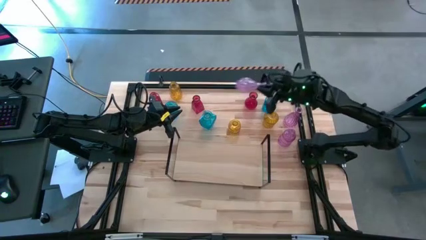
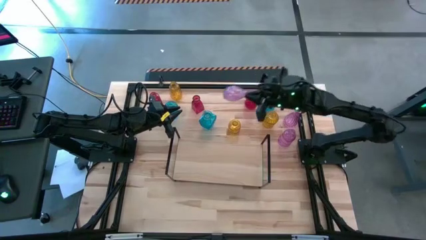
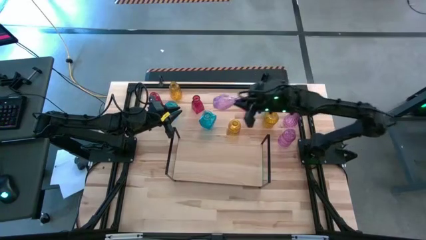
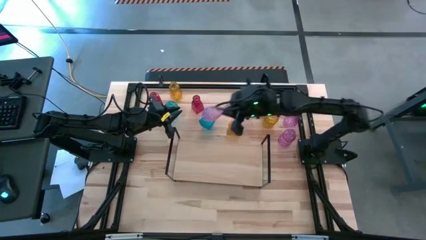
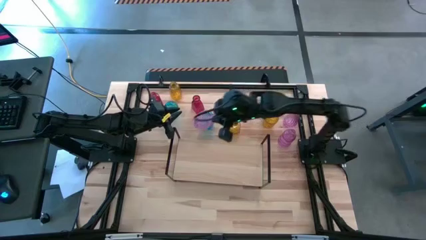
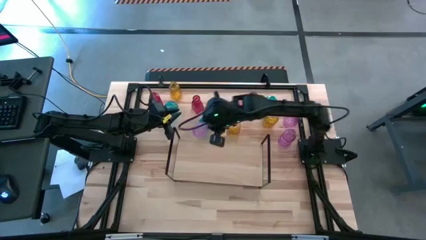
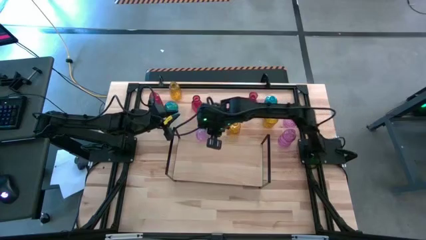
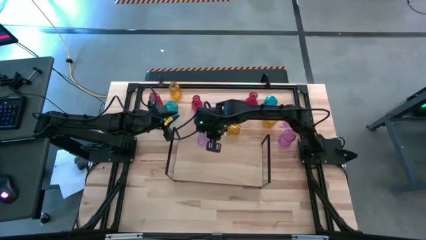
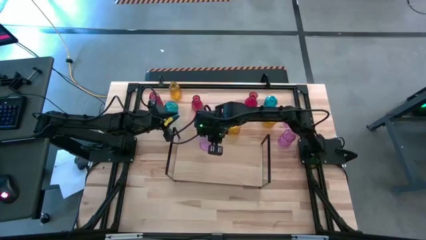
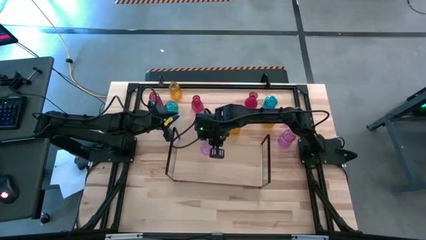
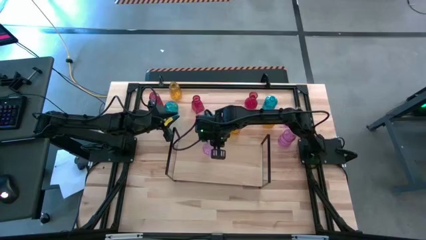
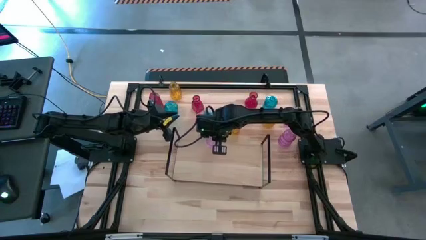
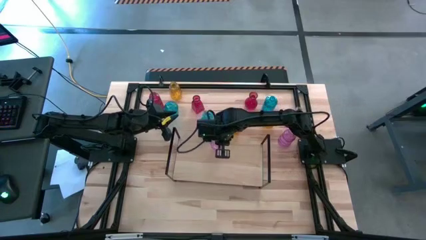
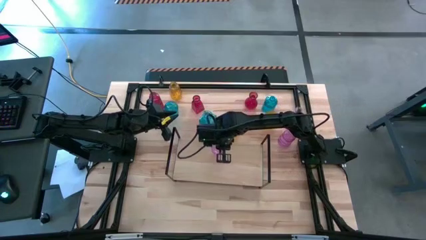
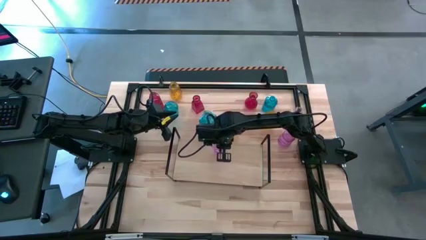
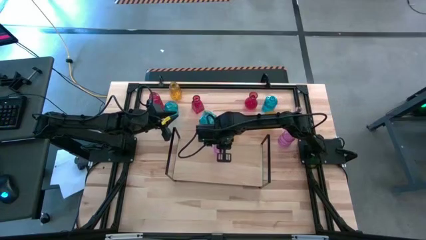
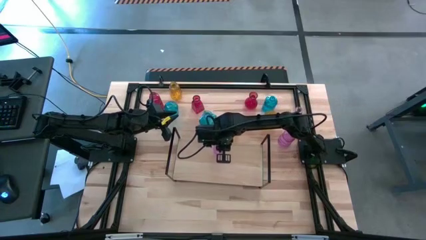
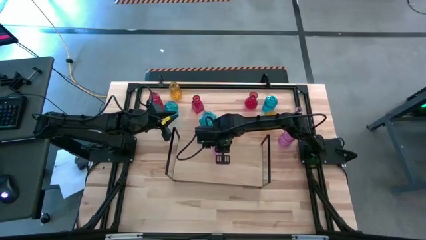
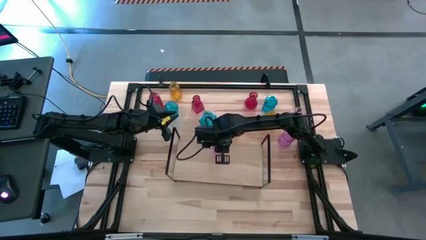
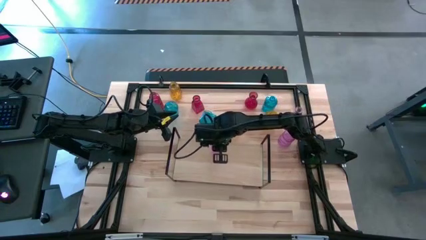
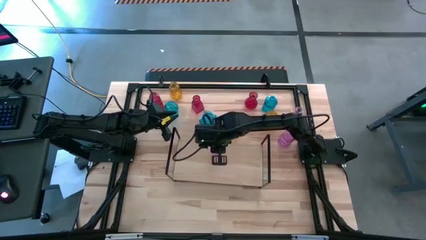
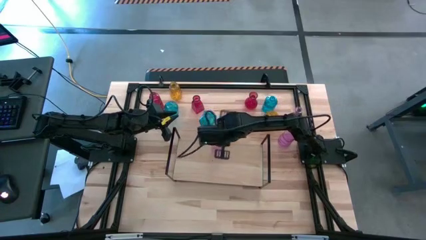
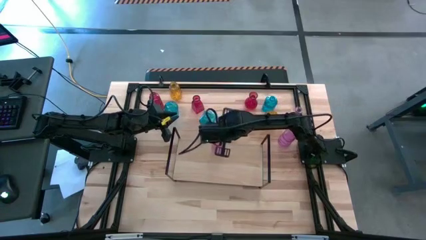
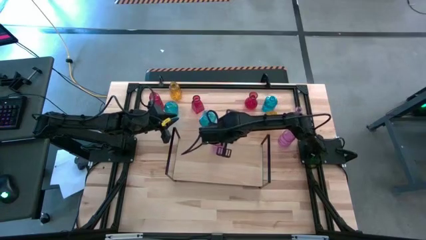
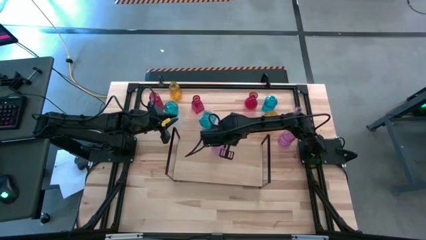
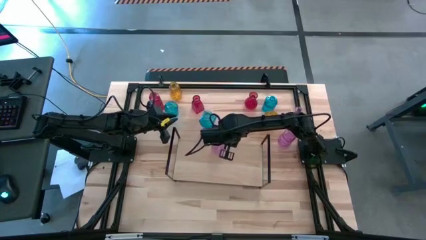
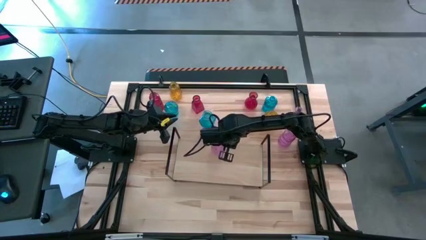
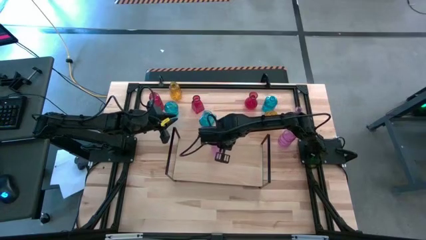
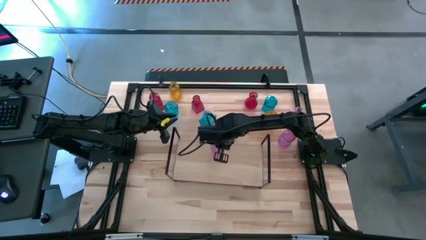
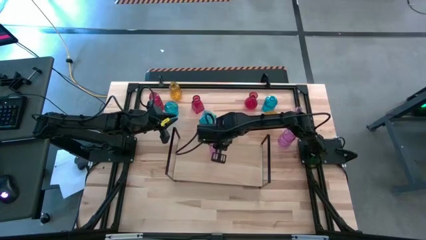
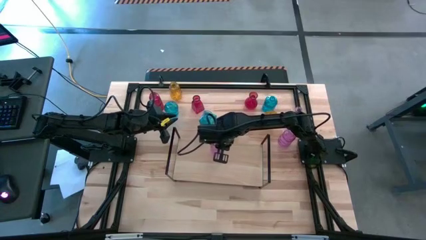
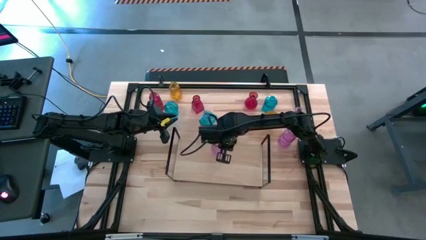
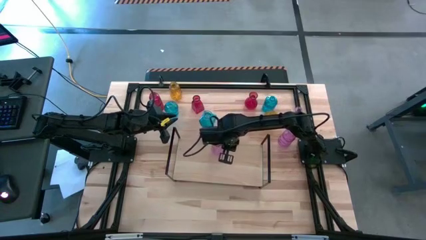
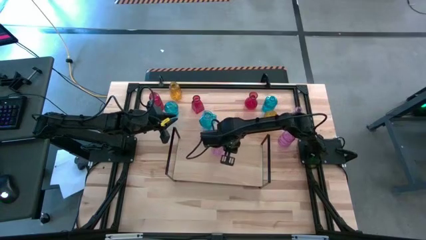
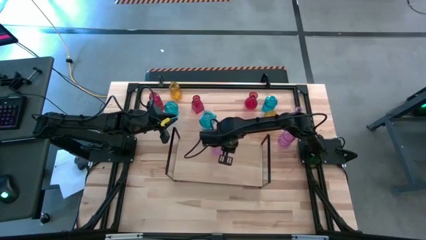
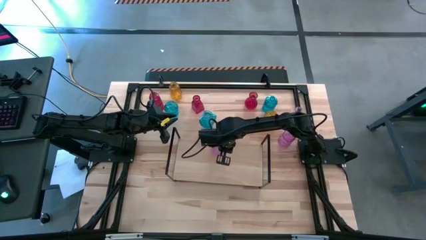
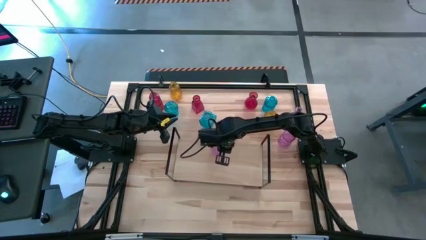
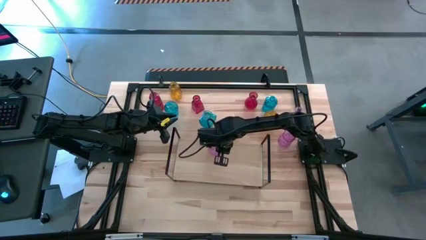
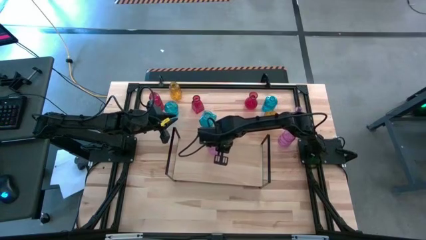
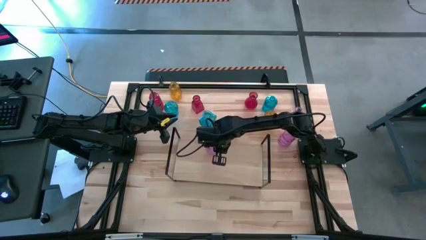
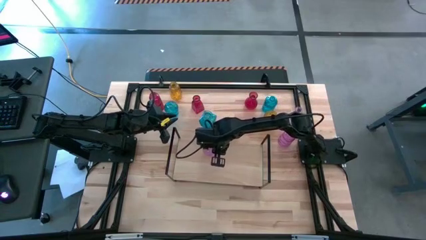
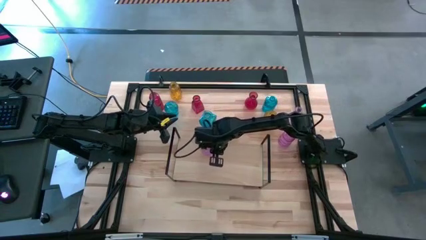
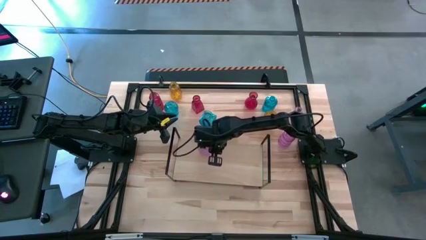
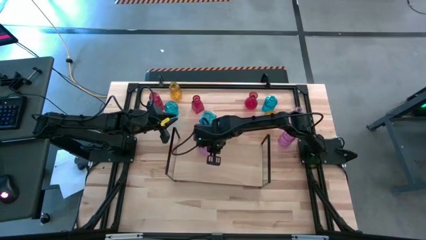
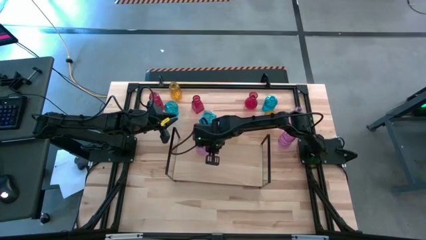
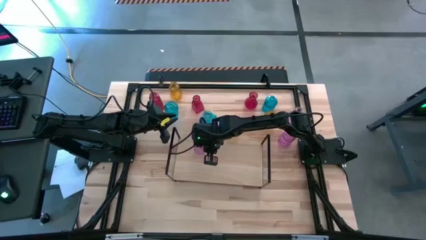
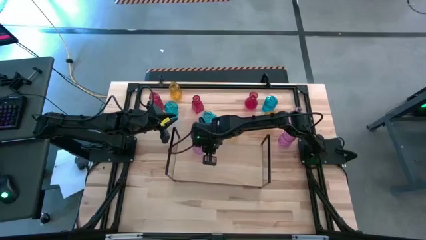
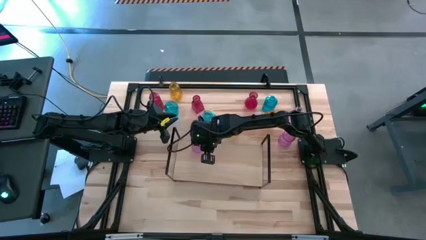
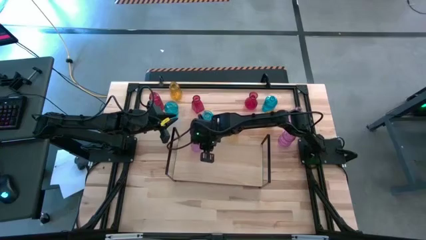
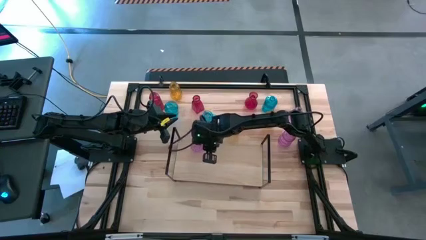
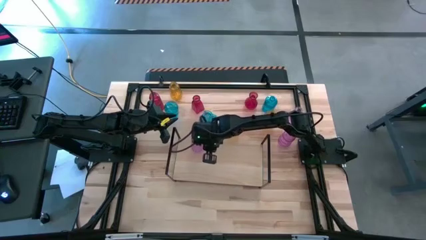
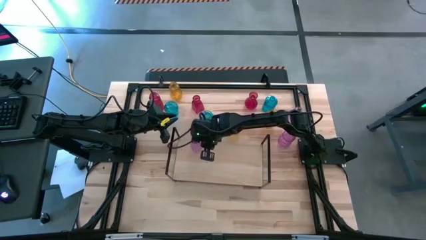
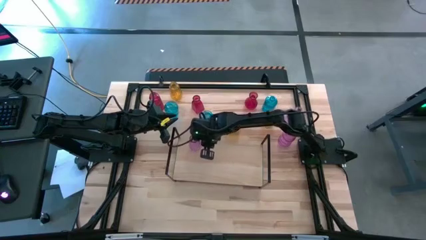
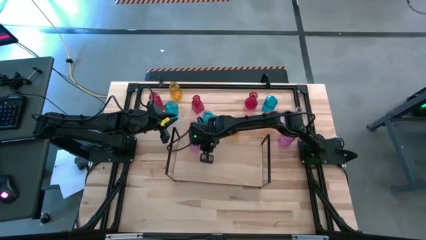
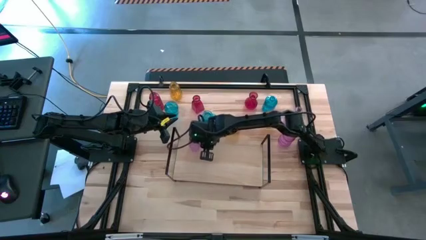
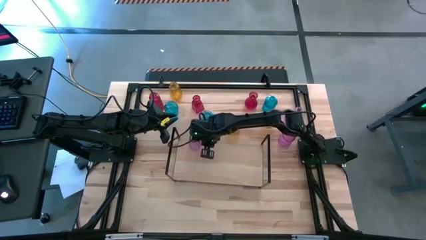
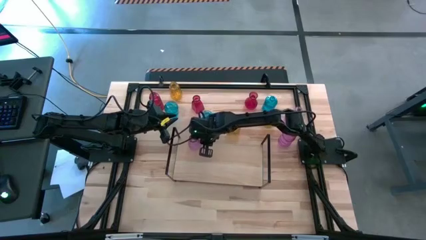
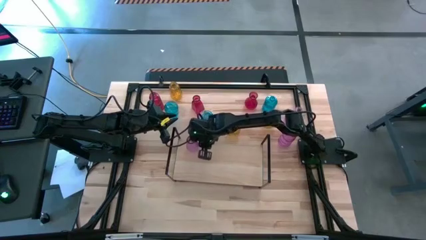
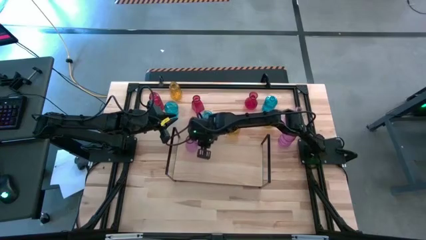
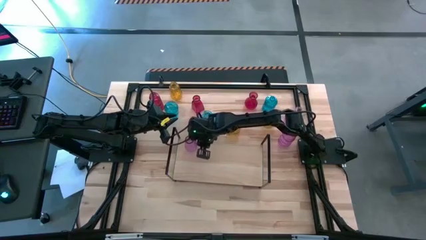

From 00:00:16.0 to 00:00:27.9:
Task: sort vases onto shelf
Put the top violet vase on the shelf

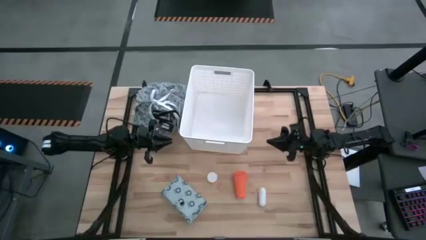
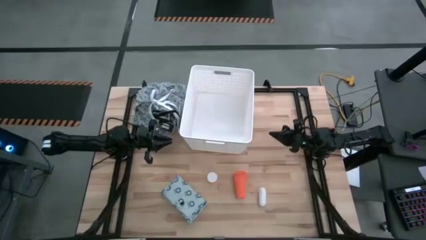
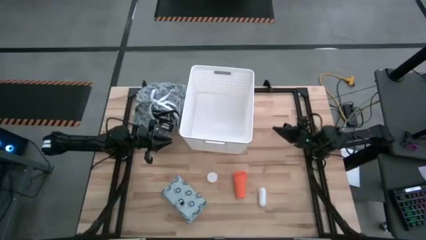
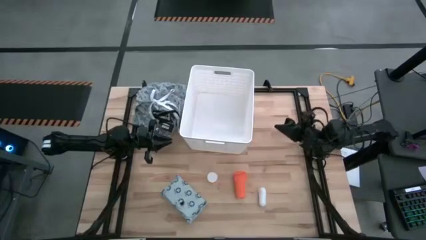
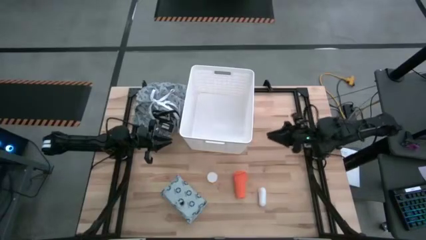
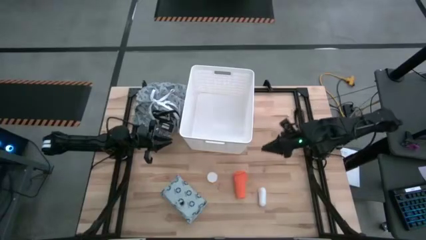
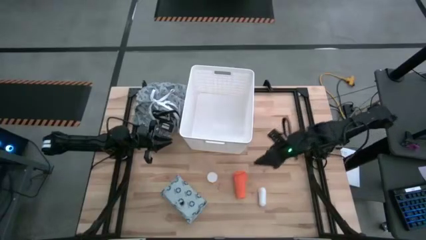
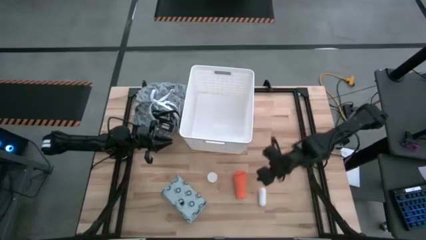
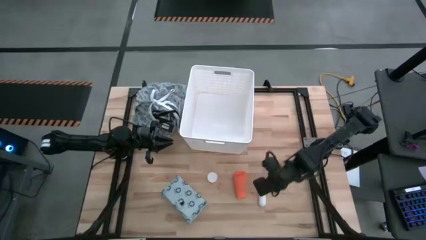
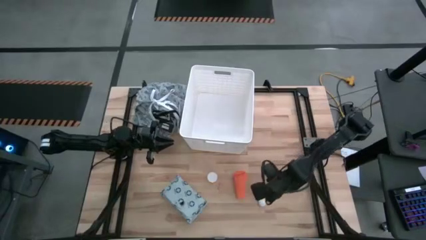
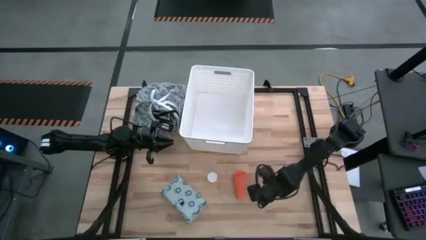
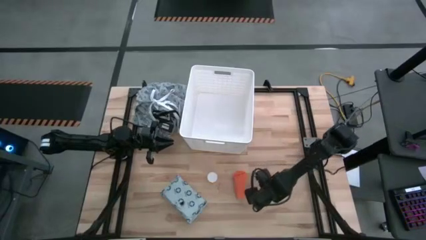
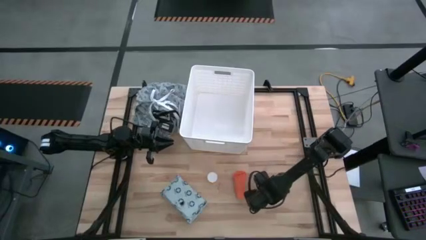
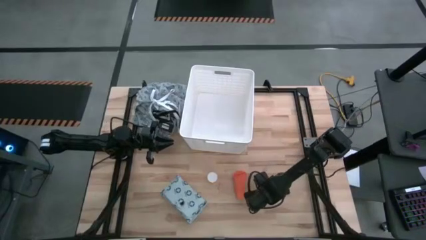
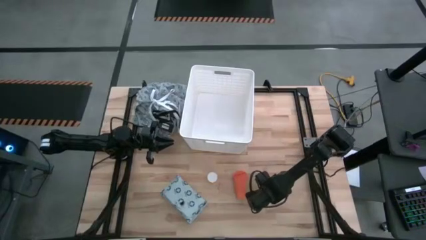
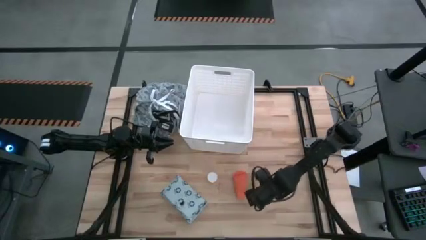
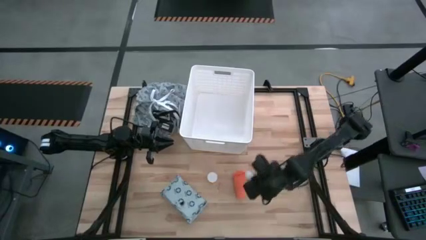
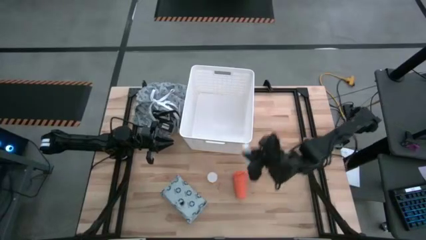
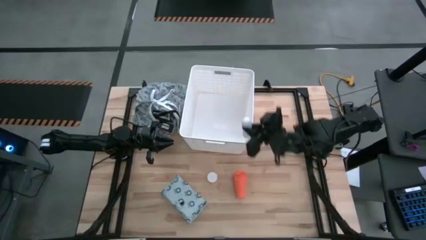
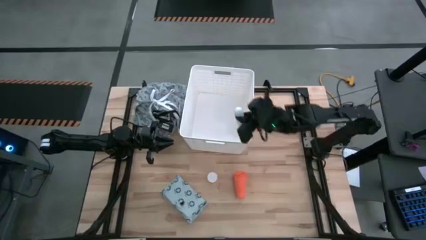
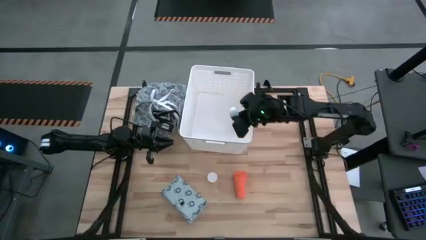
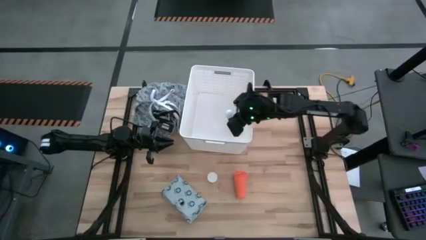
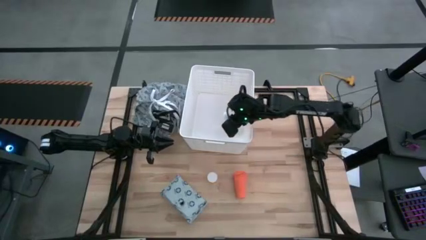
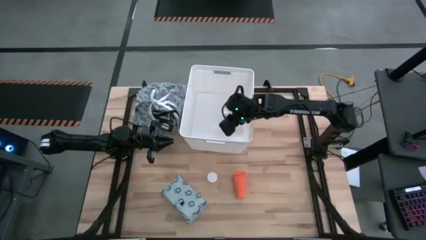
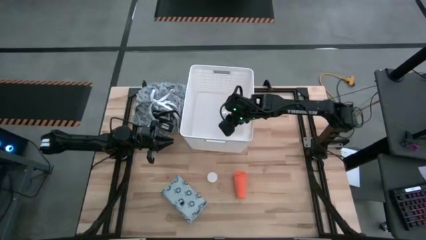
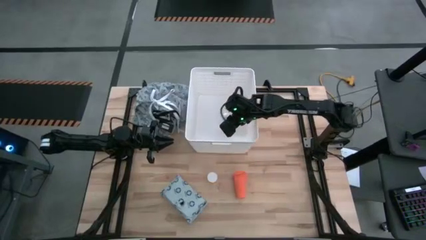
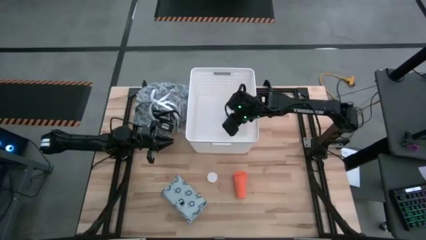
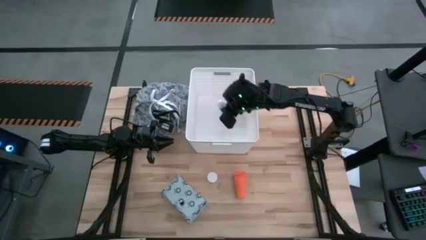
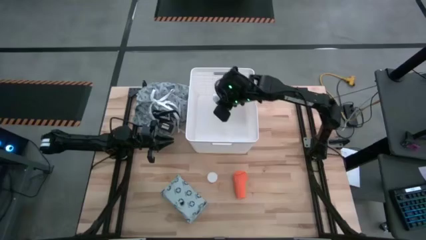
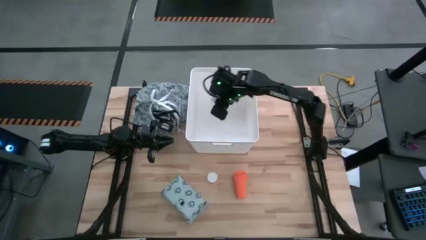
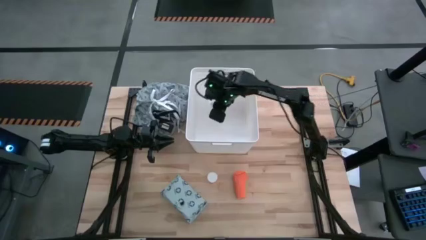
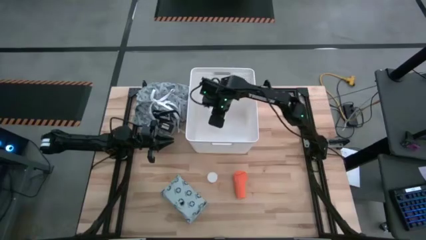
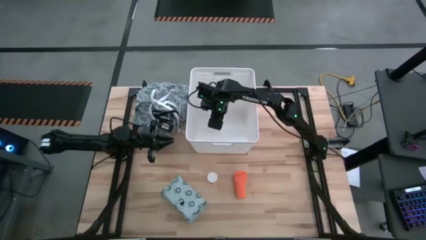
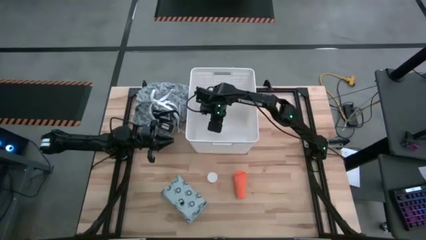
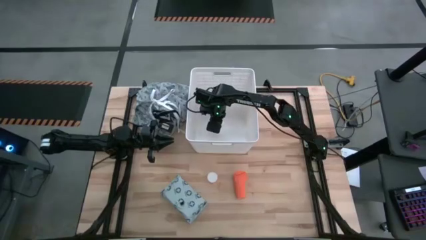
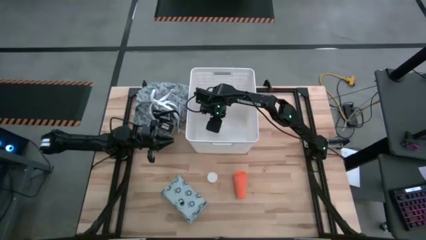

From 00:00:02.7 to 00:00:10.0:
Task: Pick & place medical supplies in basket/bin
Put the white gauze into the white bin
